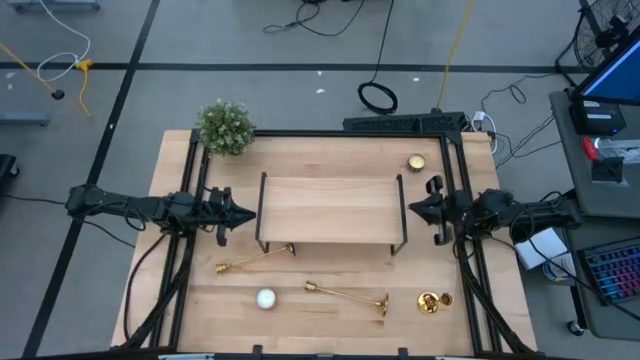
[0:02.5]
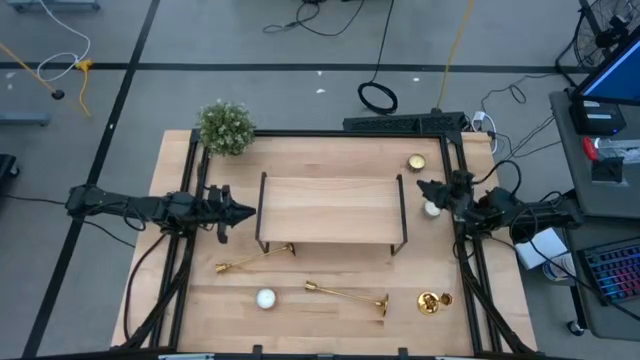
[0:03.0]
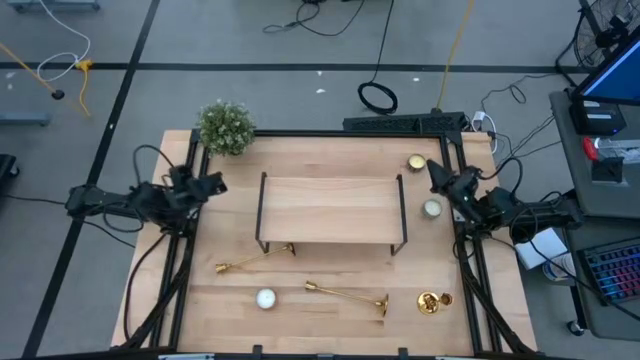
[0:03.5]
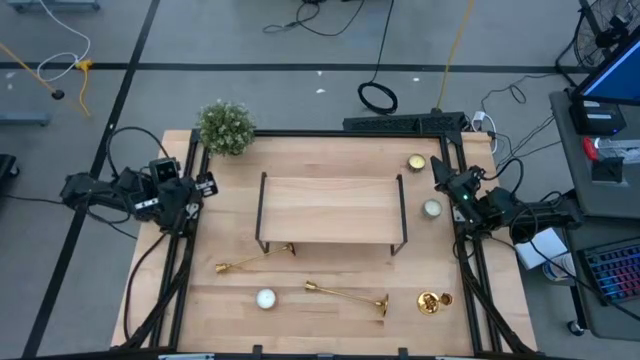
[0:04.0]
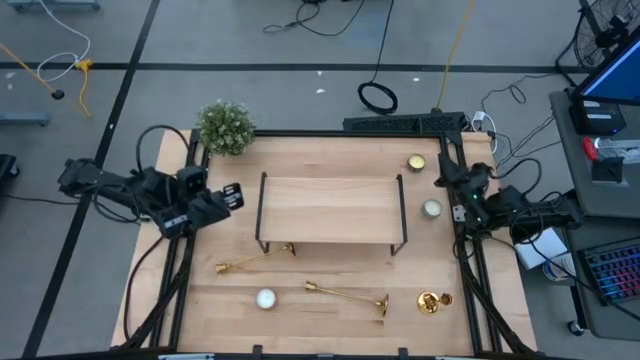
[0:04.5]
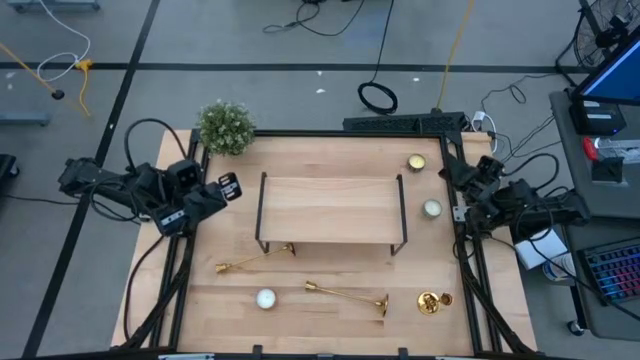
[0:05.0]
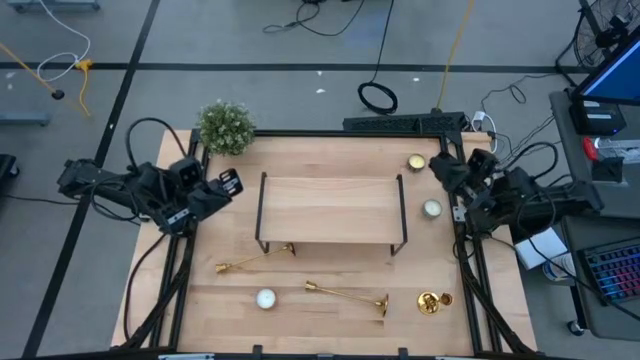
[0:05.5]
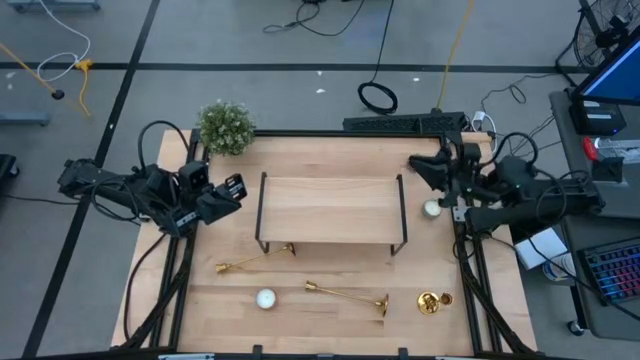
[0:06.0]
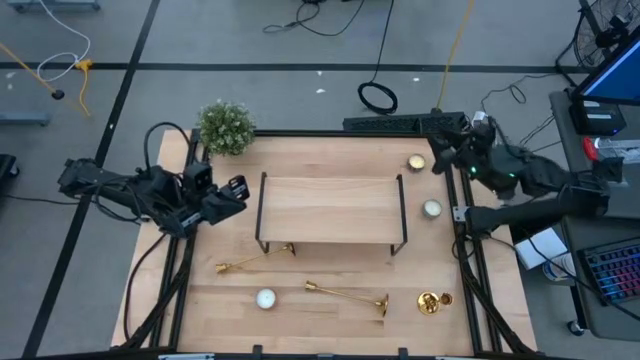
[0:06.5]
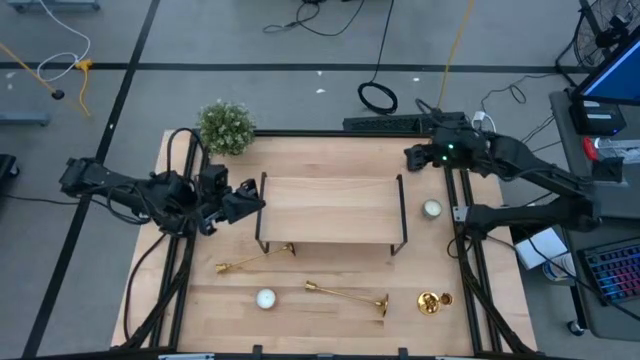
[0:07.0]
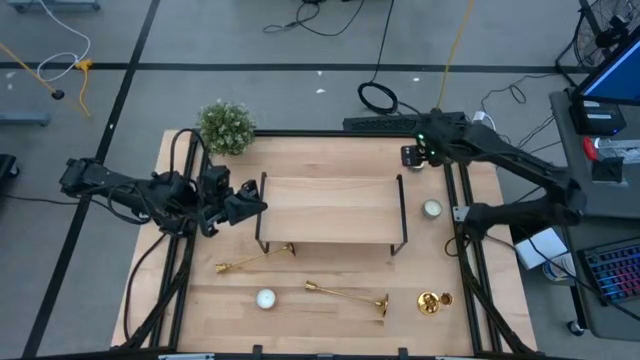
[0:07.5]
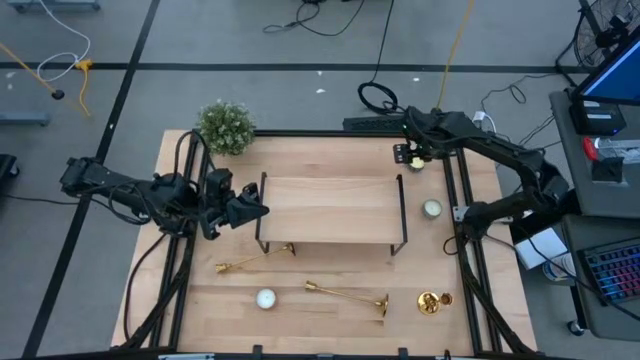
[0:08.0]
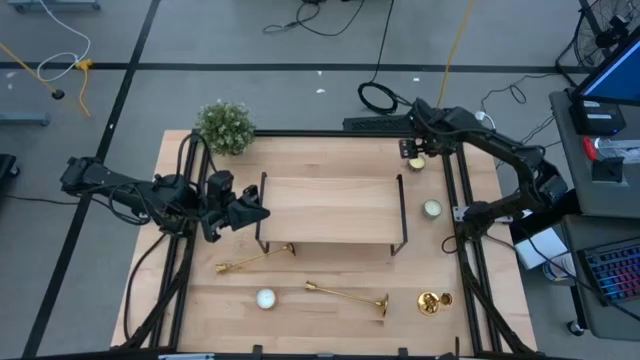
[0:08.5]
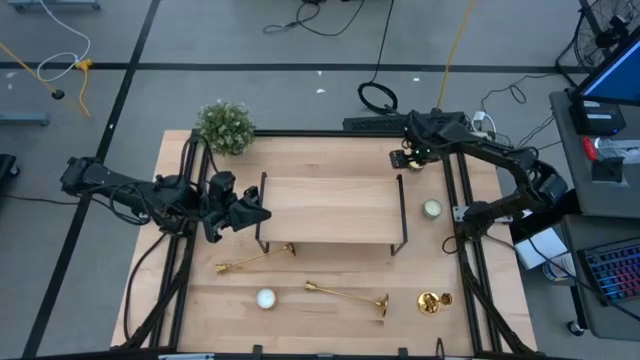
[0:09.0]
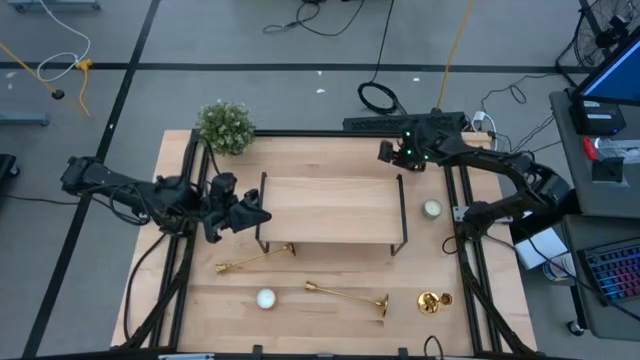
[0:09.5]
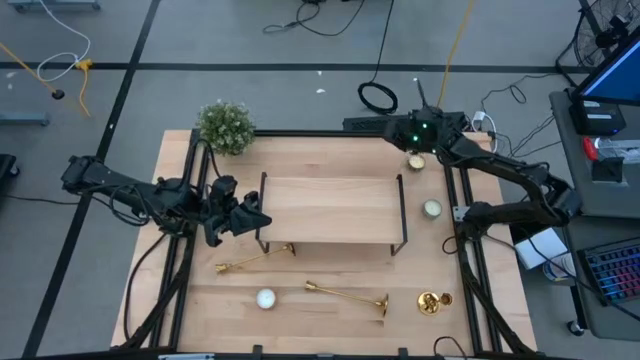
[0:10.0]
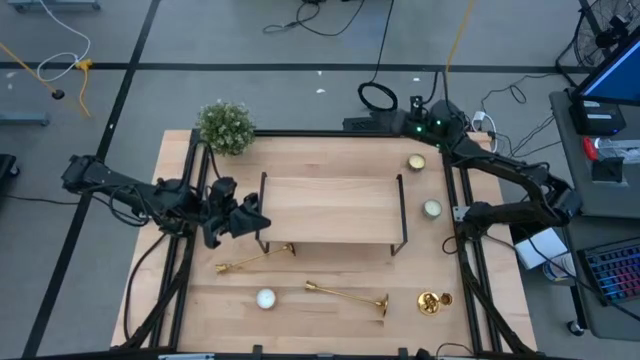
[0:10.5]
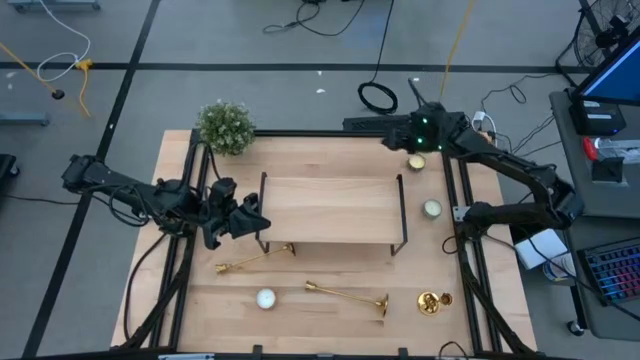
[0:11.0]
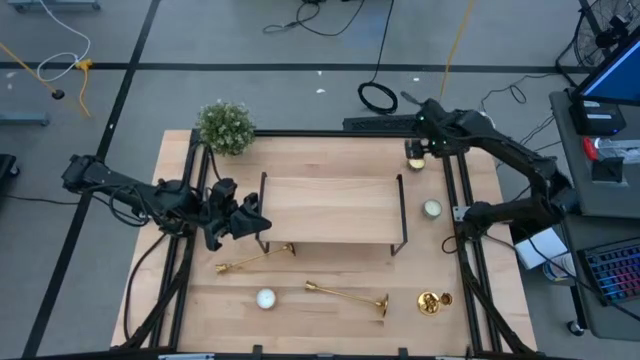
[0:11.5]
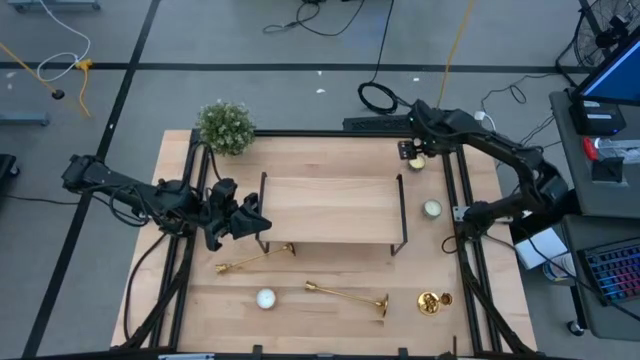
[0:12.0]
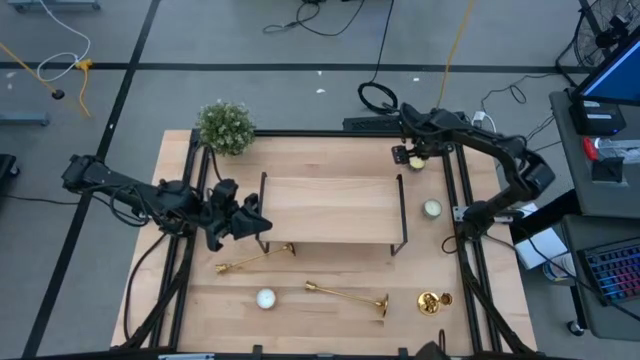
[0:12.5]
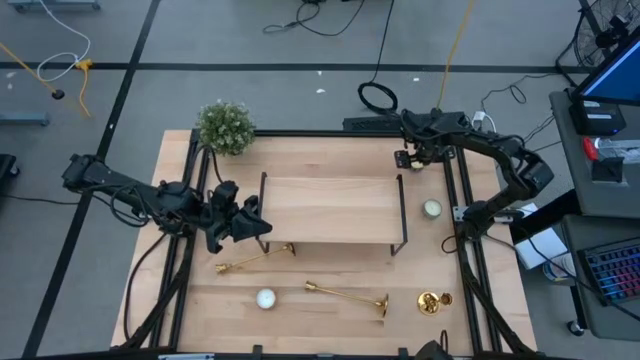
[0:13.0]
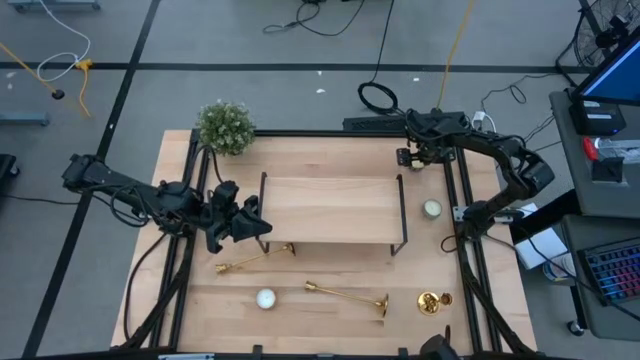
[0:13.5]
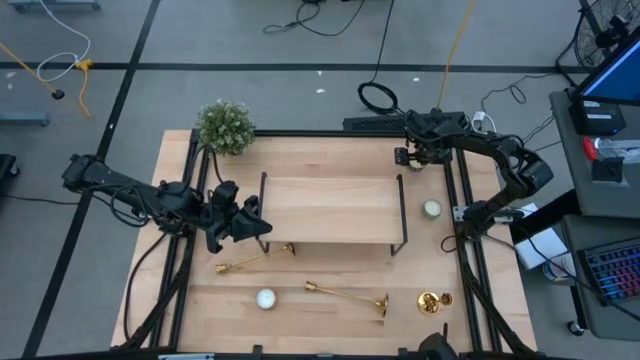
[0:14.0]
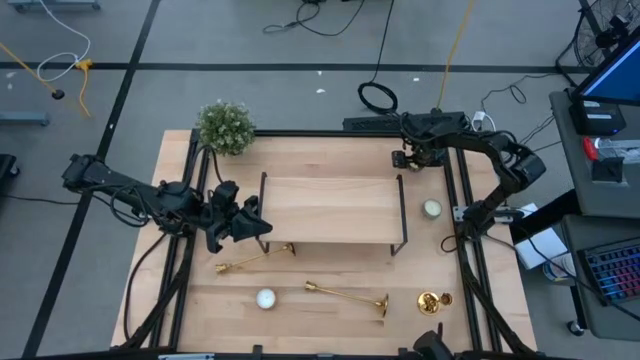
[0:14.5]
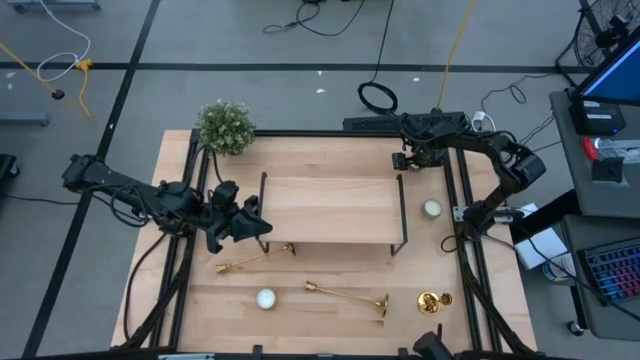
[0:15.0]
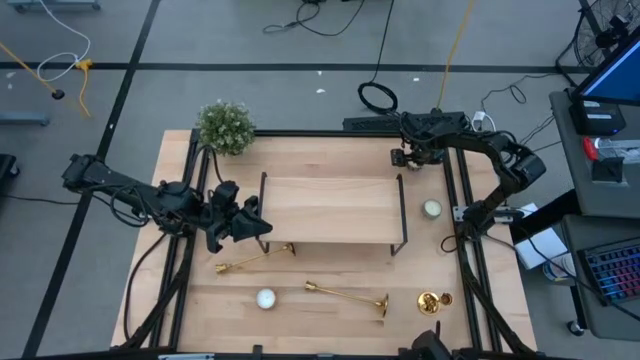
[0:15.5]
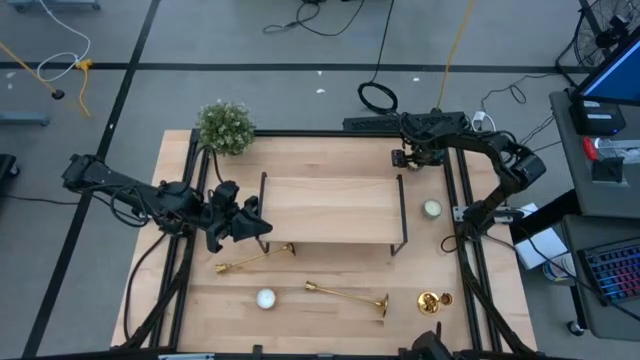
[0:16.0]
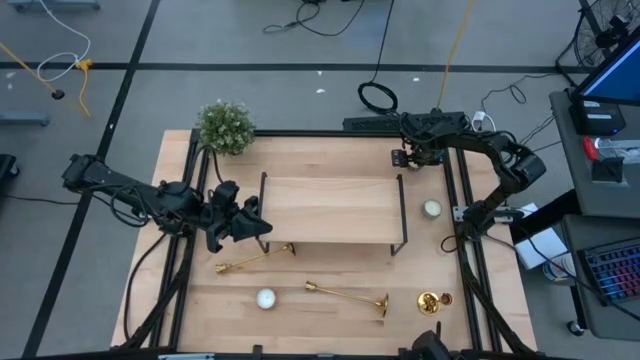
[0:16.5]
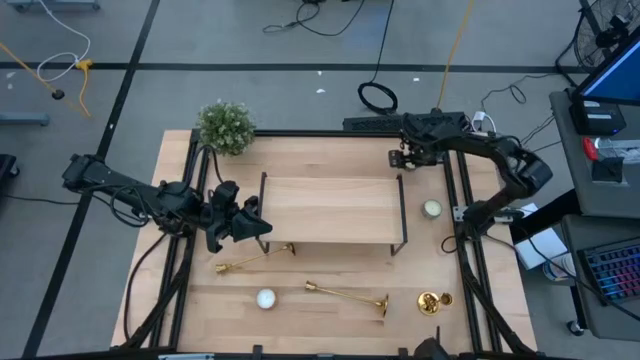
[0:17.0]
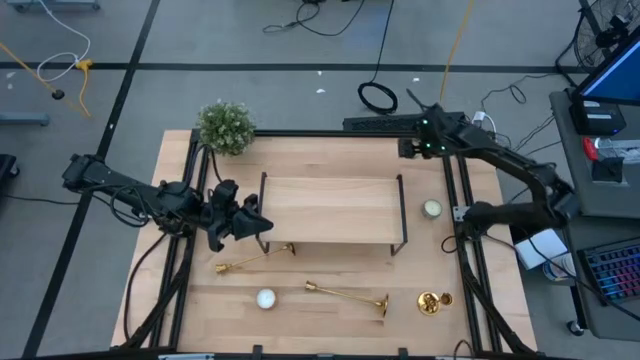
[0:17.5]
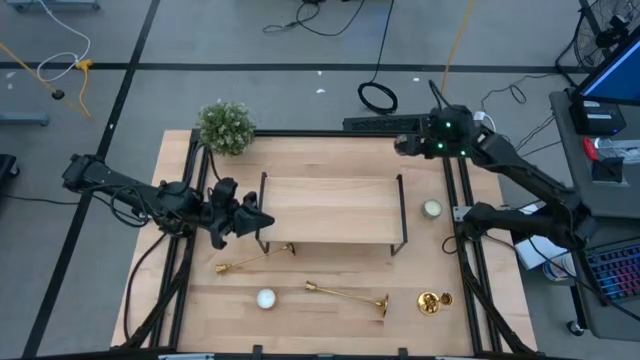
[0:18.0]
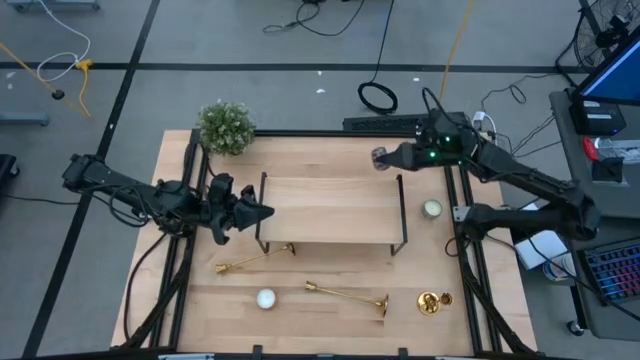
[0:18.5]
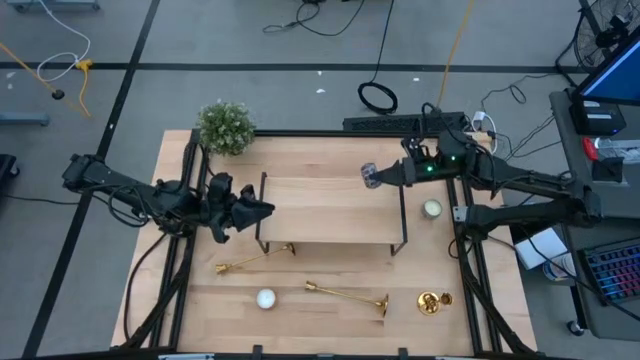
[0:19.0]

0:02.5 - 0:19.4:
Task: Pick & Place candle stick holders
Put the black scented candle on the shelf
